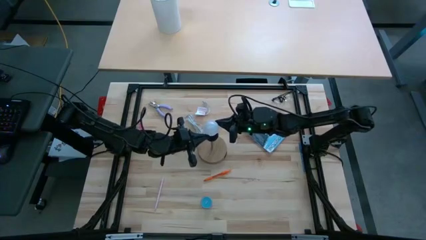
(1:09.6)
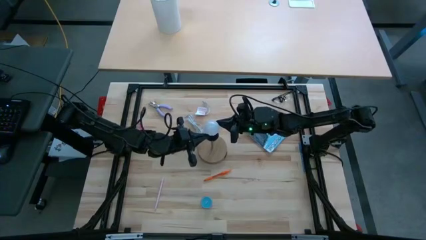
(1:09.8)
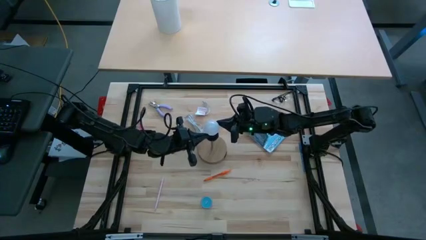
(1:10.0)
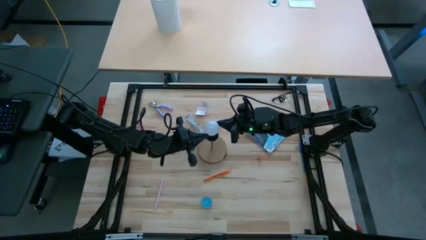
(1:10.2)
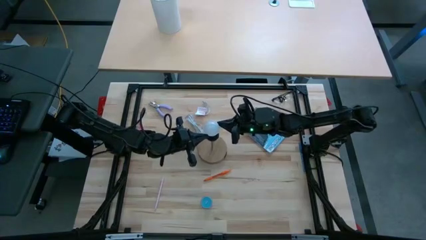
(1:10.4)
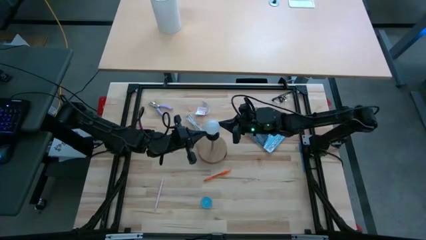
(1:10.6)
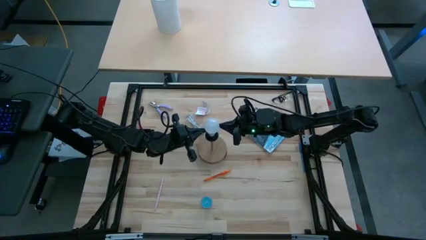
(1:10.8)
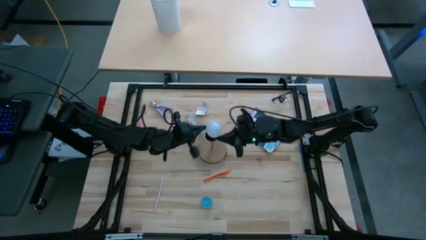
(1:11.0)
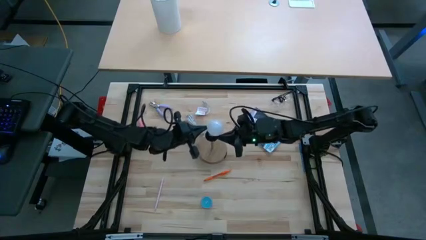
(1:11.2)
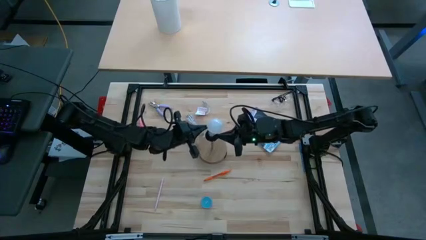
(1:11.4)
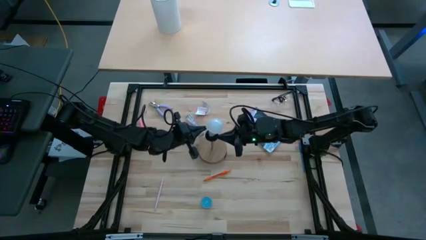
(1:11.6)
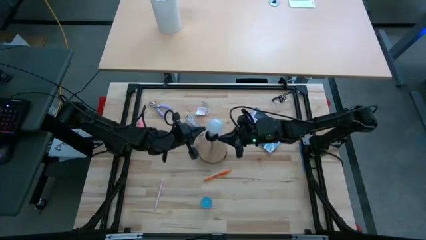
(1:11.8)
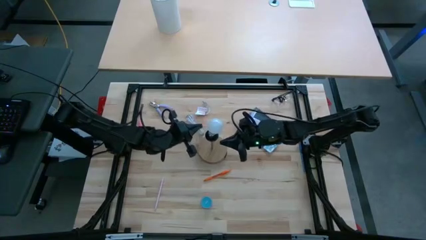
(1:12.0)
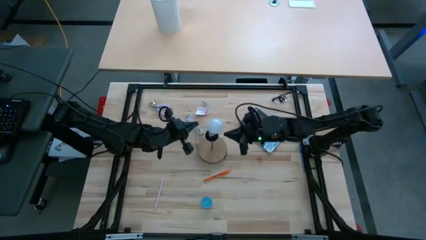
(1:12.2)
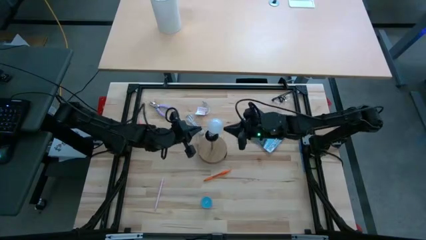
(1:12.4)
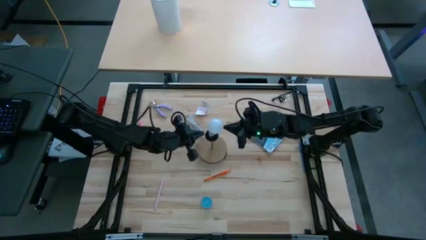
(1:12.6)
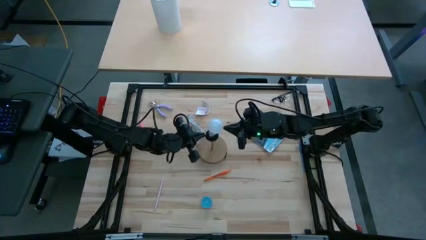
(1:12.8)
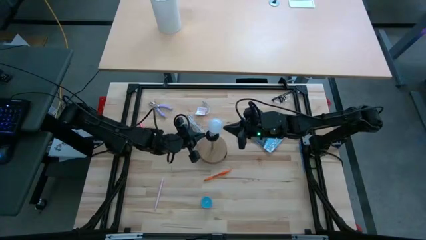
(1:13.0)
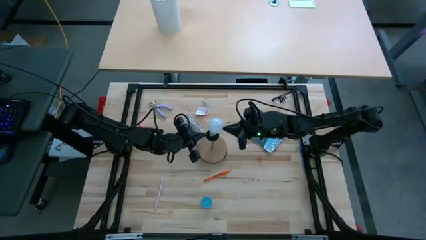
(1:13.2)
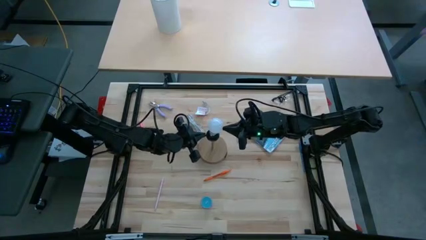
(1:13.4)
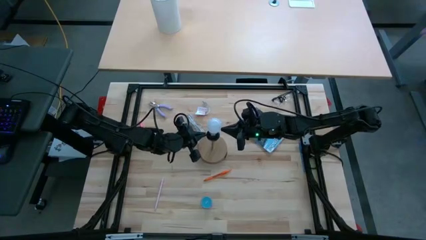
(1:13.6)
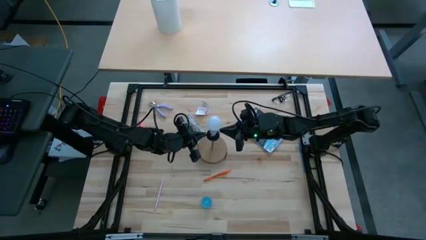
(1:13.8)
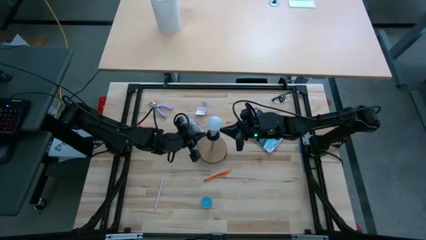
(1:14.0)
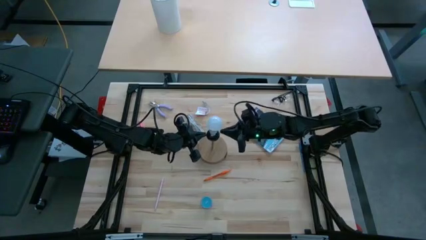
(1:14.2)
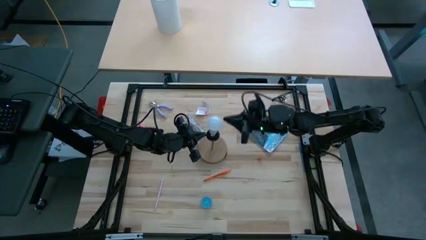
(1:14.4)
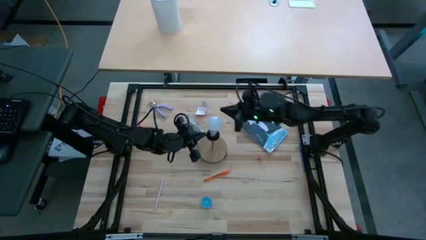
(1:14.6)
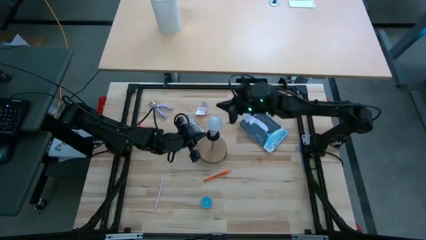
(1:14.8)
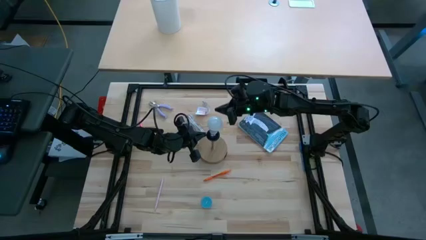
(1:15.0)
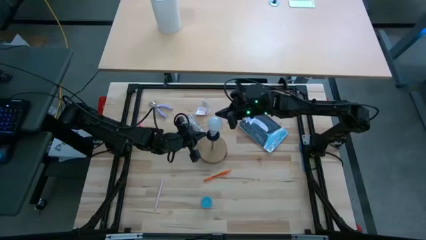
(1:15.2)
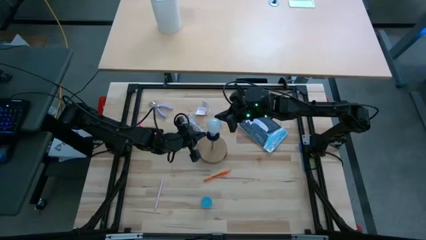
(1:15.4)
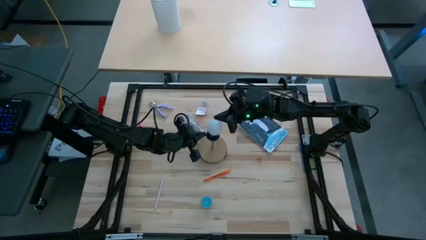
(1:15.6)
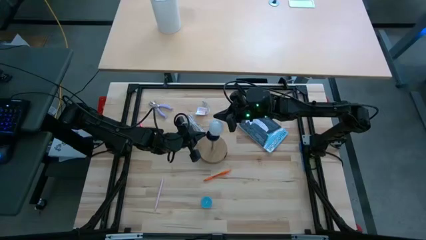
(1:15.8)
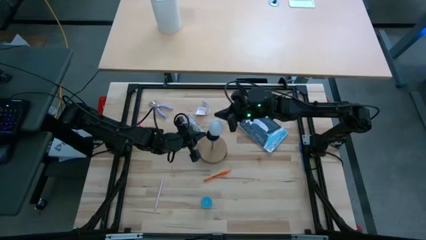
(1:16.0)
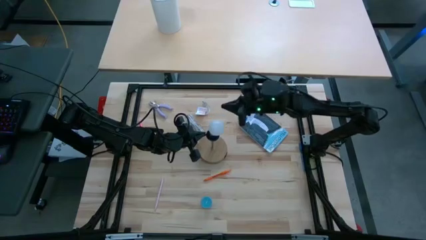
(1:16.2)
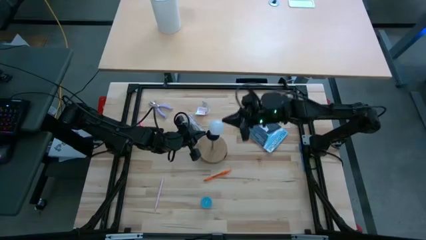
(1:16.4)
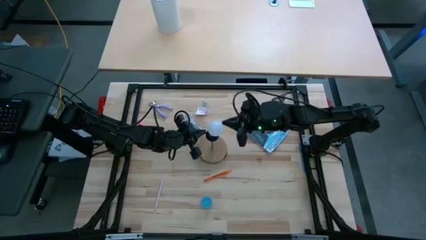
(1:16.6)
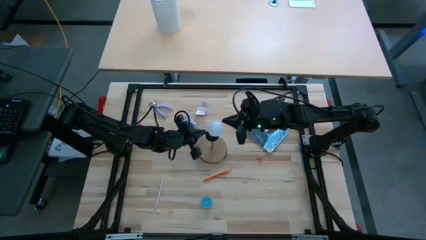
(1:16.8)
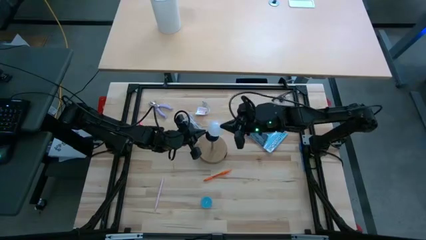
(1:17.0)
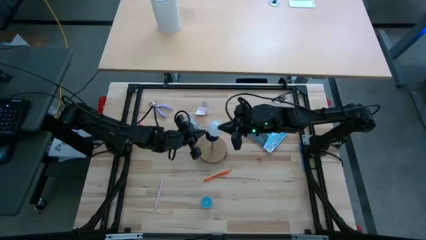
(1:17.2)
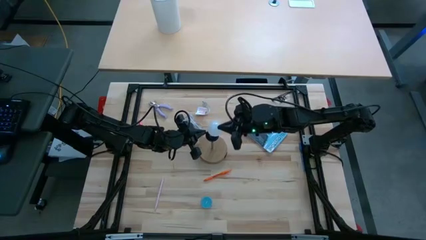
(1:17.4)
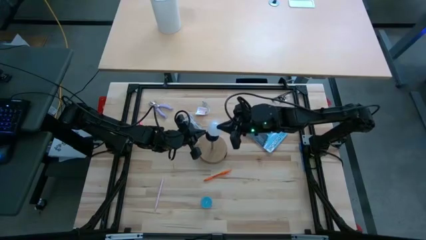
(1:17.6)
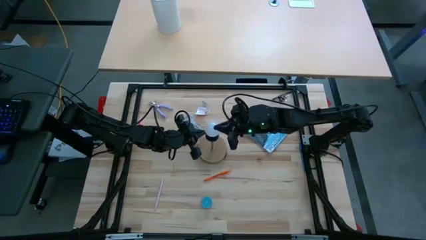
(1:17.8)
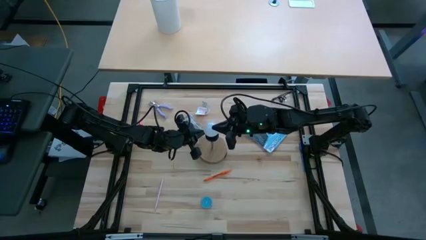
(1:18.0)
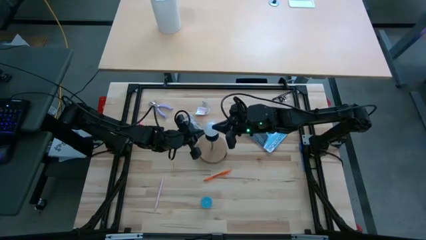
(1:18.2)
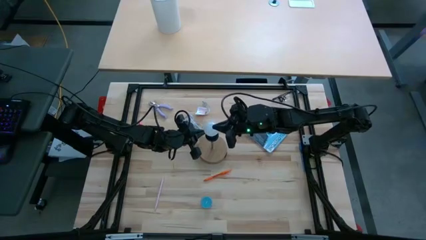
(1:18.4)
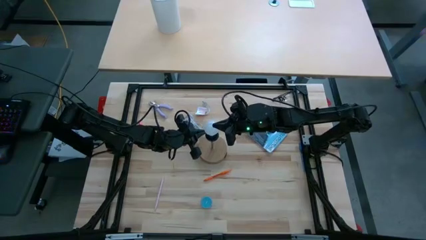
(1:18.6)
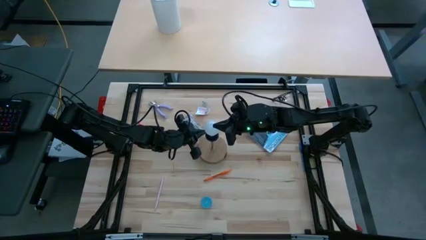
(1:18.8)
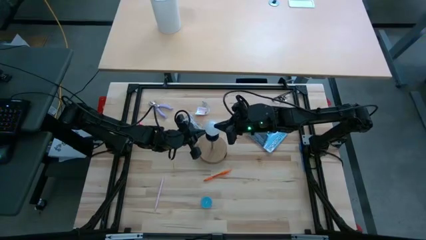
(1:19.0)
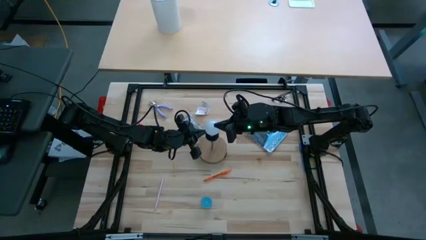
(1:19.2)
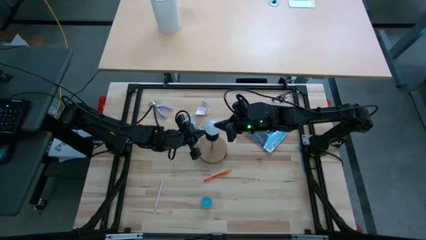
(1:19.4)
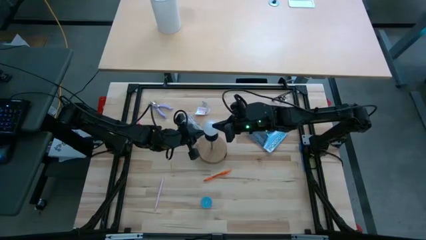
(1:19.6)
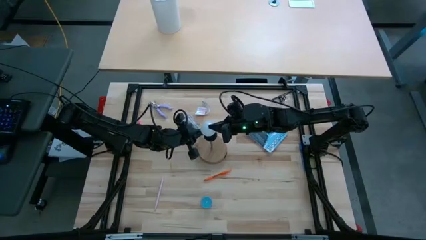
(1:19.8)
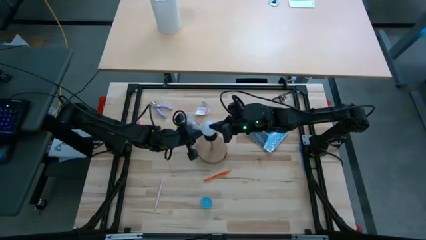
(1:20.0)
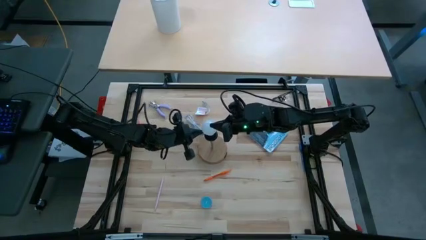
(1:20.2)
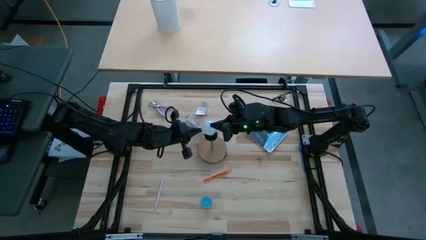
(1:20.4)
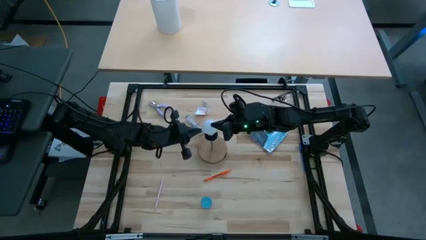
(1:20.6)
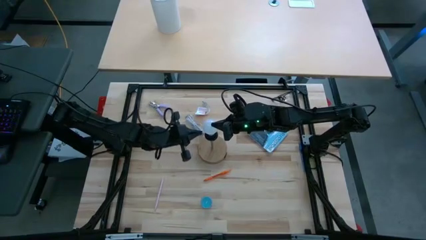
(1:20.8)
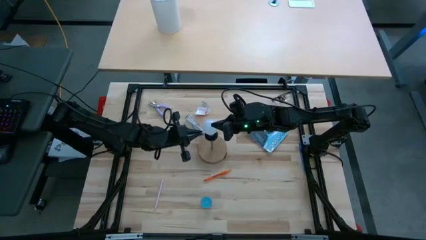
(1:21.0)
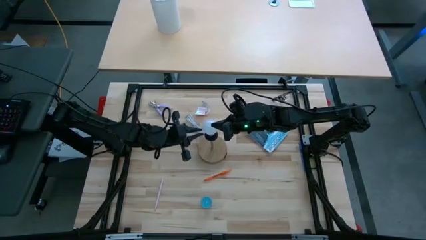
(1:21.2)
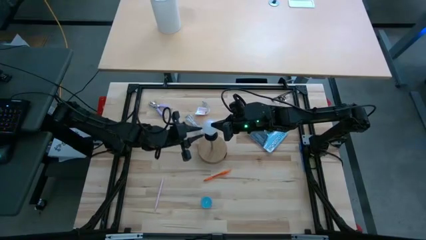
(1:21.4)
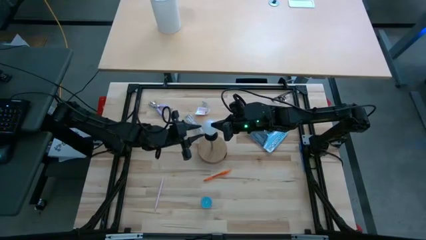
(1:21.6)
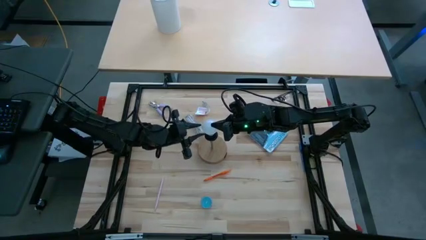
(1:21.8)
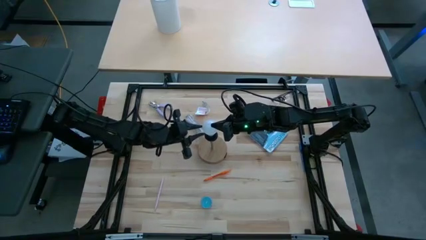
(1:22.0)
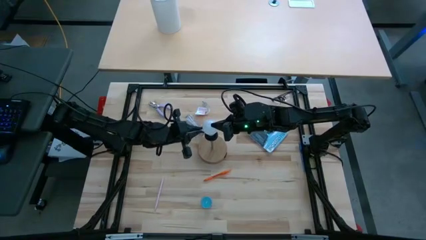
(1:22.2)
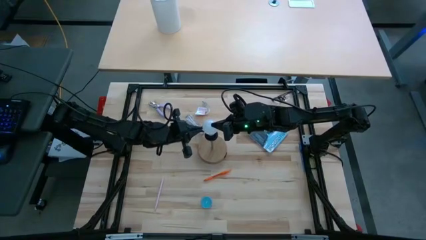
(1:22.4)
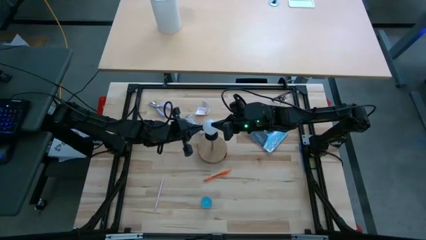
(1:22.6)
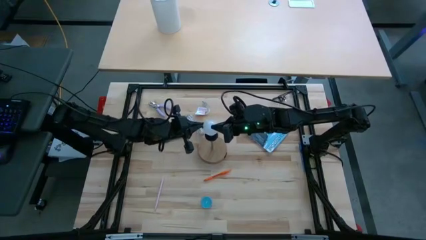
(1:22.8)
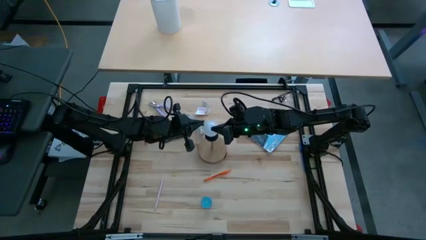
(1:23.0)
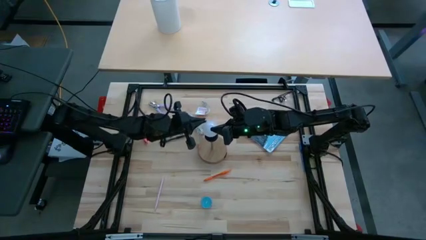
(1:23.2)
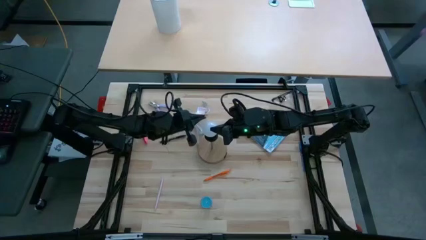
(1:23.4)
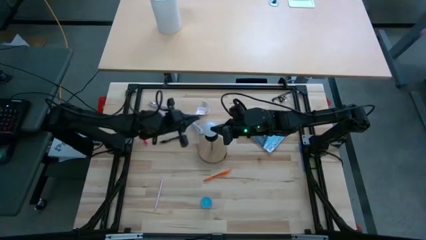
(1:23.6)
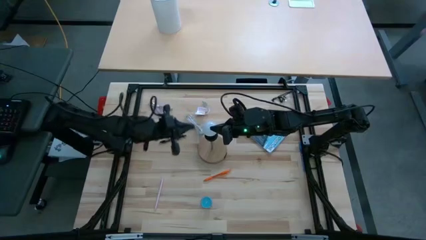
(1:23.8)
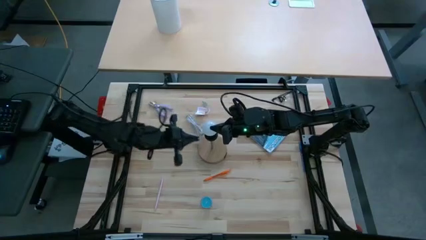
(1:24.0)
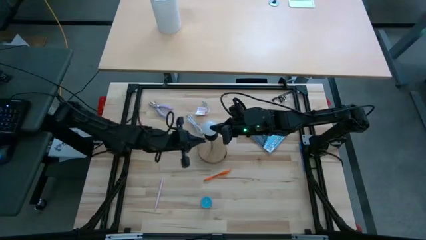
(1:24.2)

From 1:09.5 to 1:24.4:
Task: Screw lightbulb
Insert the light bulb into the lamp

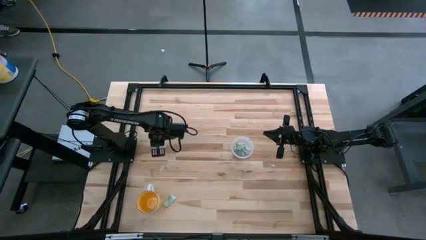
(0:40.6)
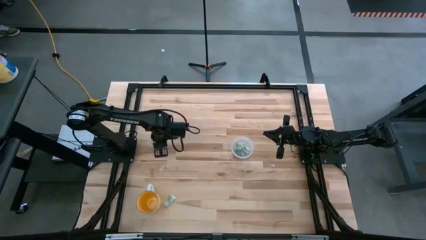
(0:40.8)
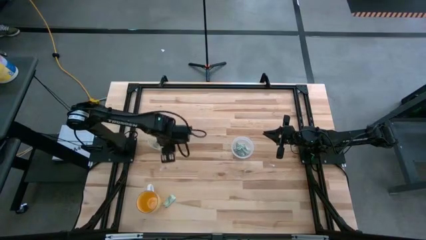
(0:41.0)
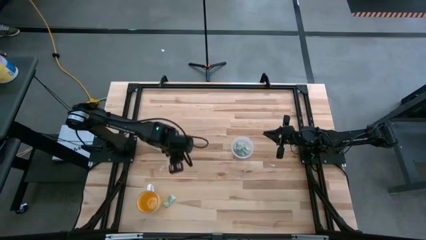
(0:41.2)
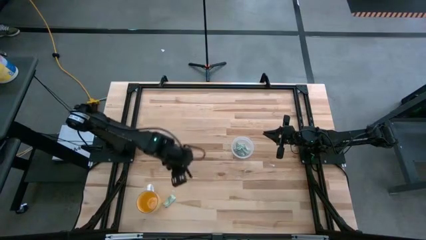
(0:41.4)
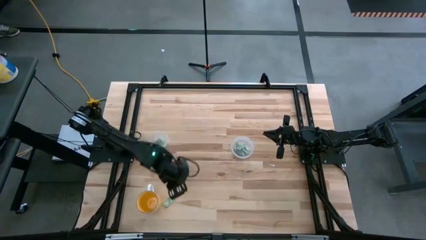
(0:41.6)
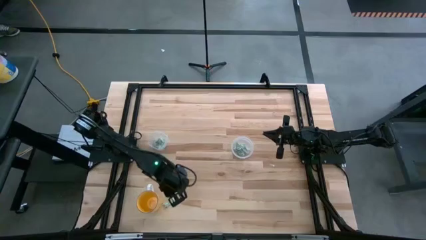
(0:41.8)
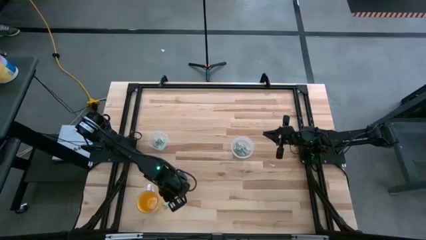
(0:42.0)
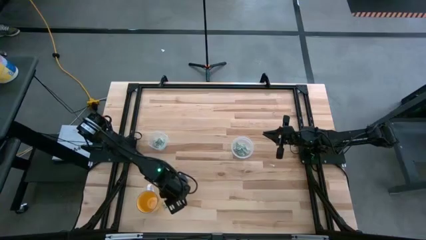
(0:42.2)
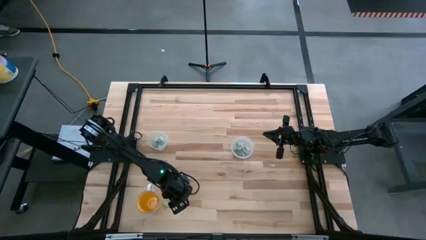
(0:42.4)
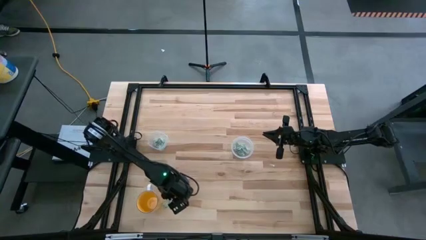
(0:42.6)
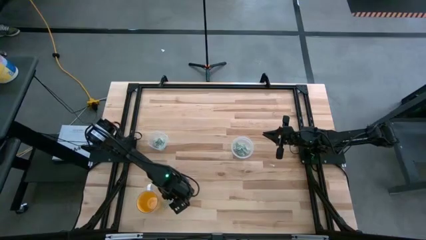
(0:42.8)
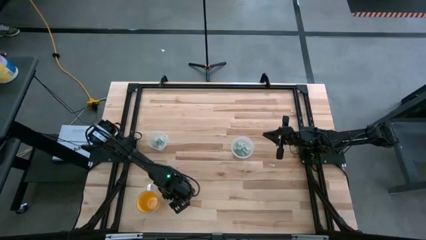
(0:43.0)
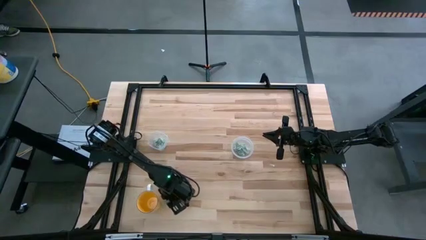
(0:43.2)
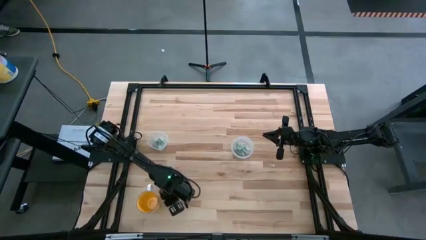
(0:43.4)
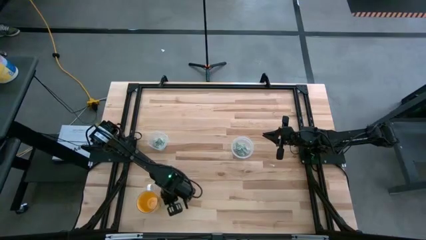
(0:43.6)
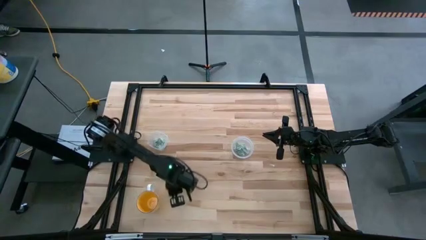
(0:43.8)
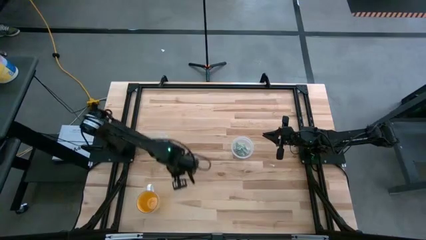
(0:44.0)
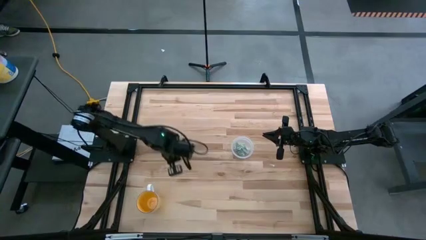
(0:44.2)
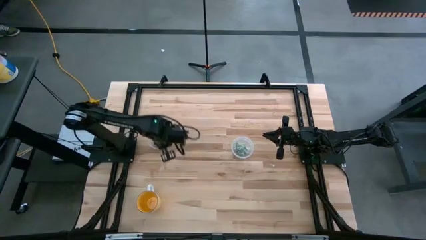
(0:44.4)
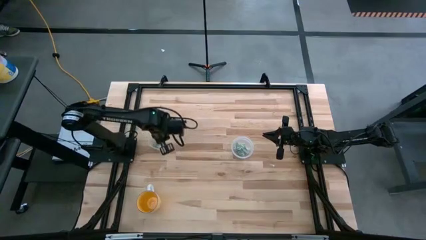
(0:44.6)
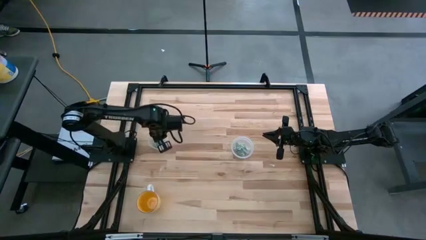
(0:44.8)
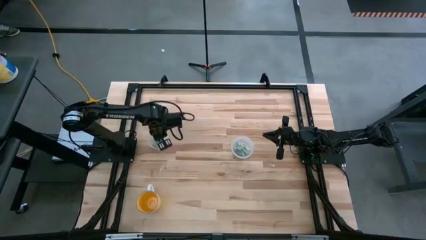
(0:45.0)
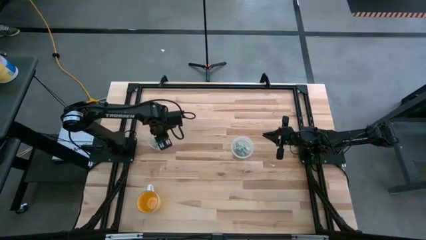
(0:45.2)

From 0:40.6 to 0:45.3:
Task: Pick and place items into bin
Put the stevia pack into the left transparent bin
